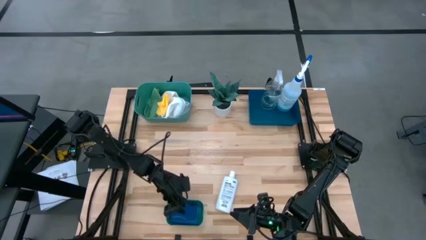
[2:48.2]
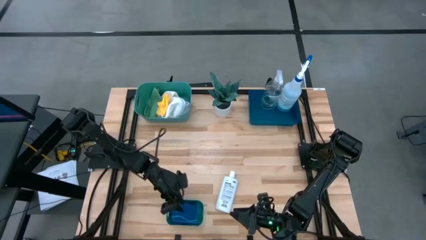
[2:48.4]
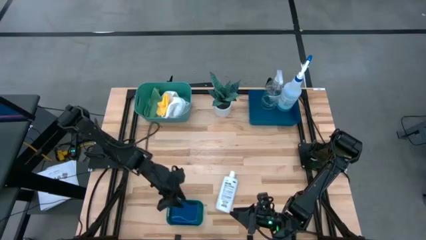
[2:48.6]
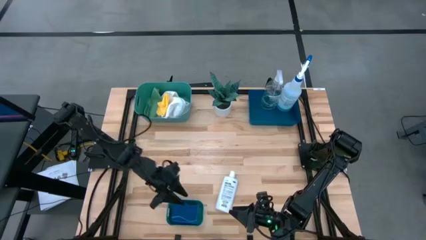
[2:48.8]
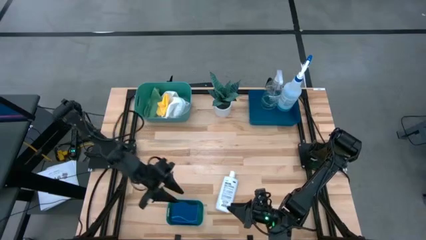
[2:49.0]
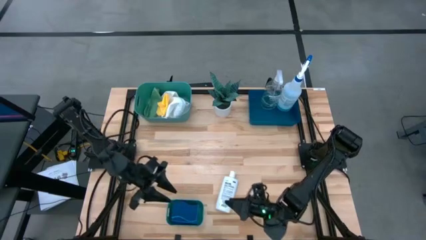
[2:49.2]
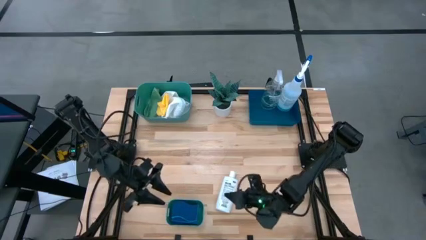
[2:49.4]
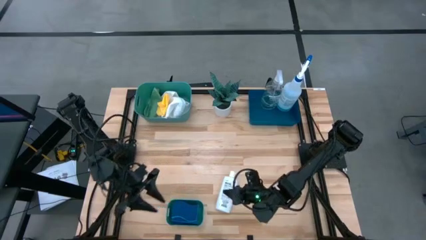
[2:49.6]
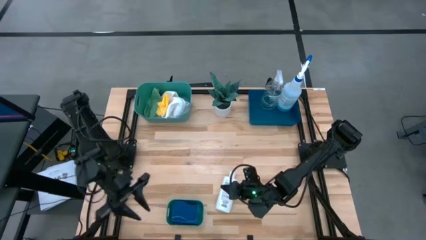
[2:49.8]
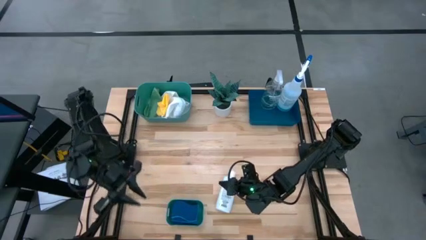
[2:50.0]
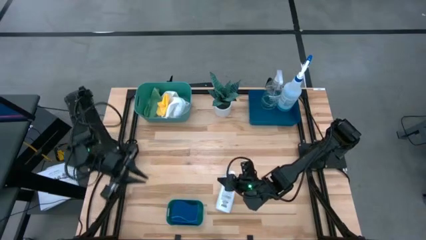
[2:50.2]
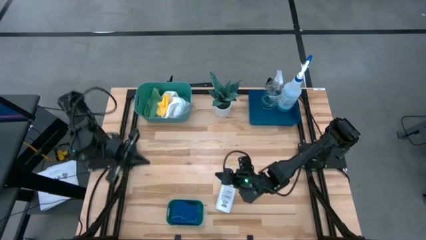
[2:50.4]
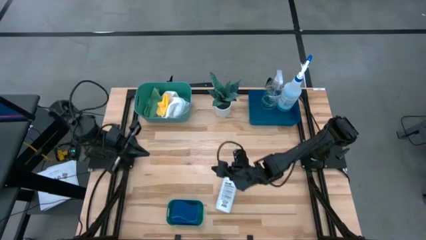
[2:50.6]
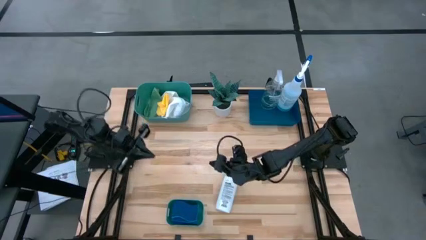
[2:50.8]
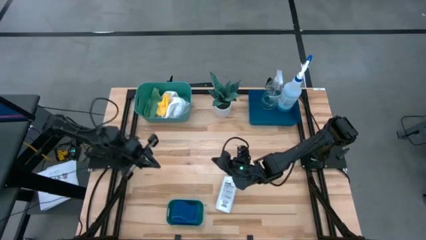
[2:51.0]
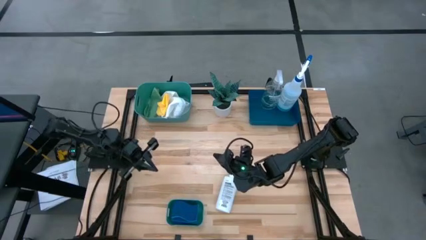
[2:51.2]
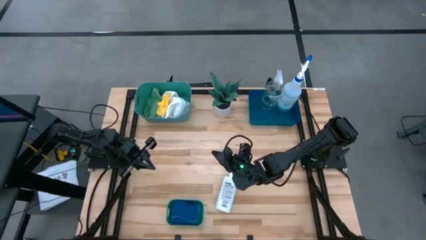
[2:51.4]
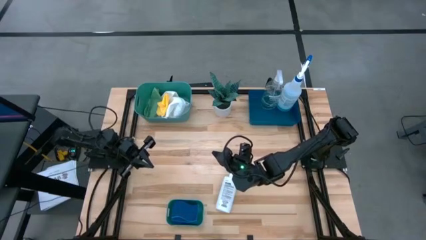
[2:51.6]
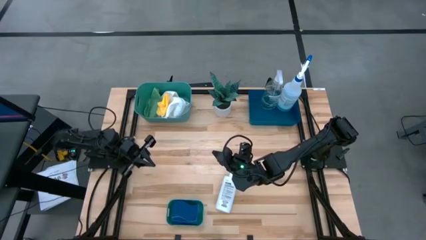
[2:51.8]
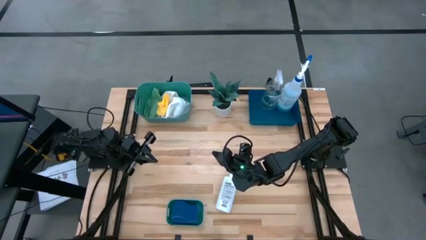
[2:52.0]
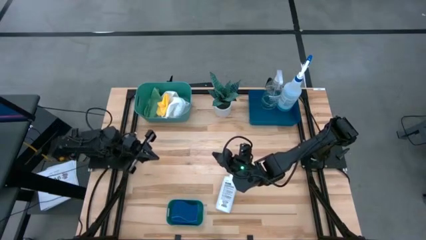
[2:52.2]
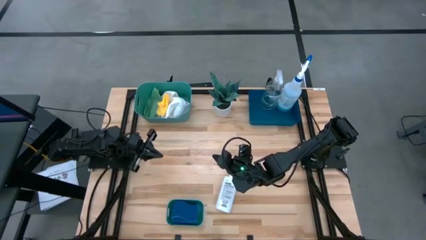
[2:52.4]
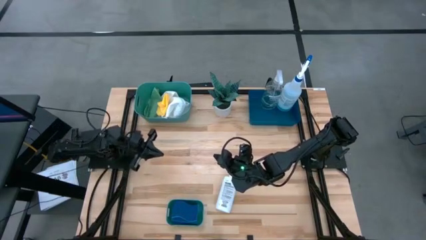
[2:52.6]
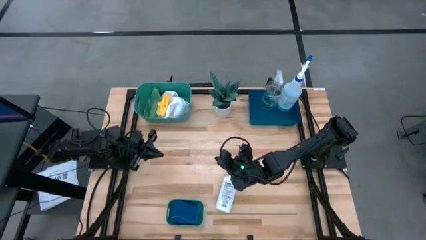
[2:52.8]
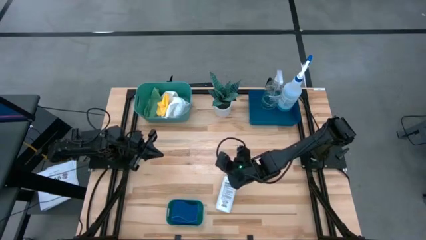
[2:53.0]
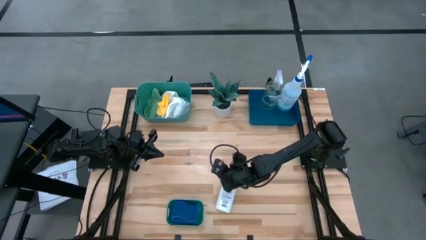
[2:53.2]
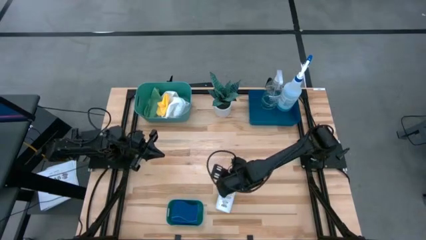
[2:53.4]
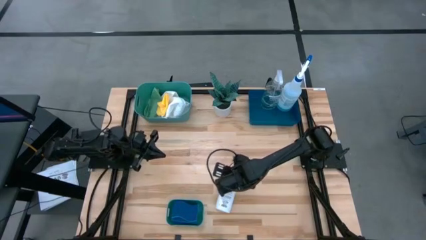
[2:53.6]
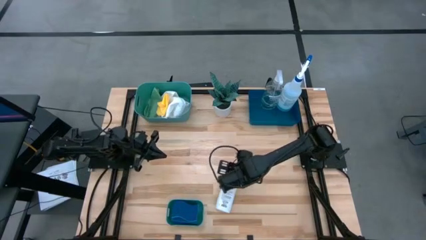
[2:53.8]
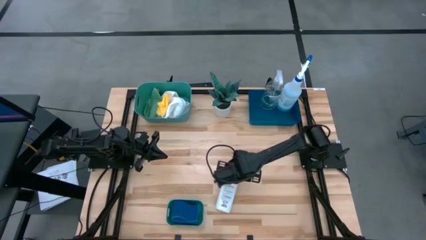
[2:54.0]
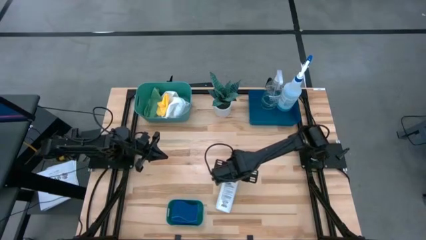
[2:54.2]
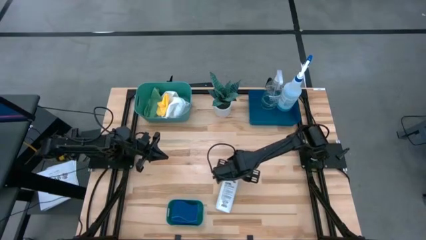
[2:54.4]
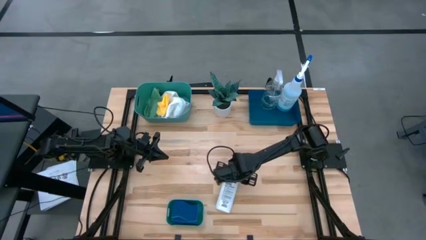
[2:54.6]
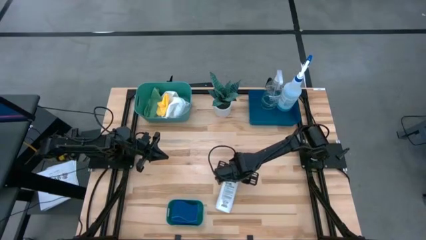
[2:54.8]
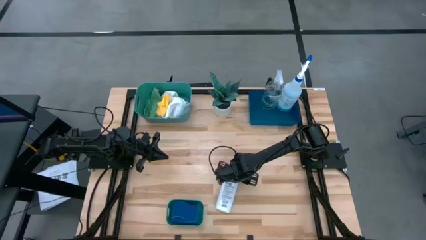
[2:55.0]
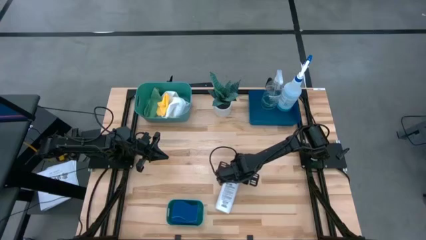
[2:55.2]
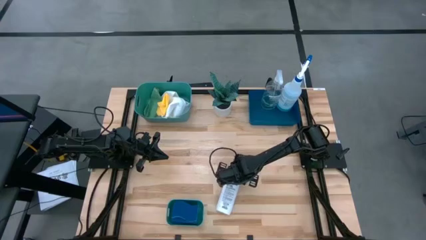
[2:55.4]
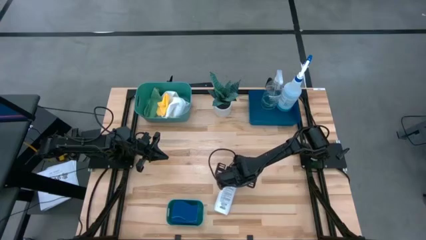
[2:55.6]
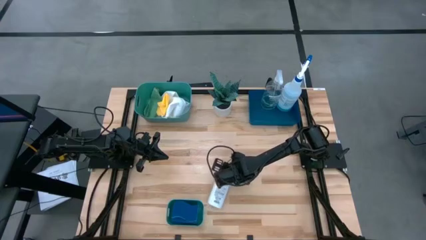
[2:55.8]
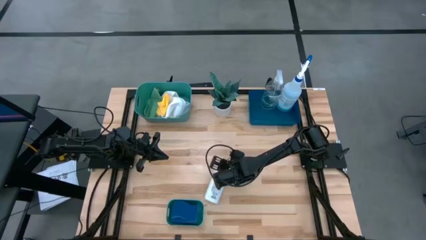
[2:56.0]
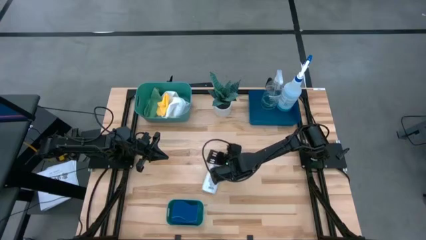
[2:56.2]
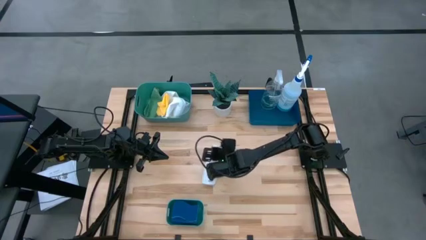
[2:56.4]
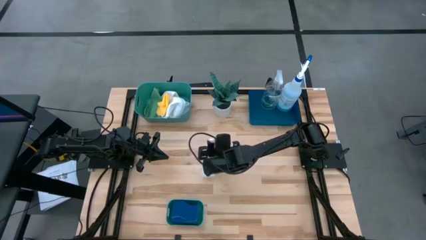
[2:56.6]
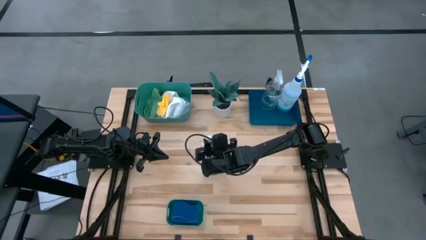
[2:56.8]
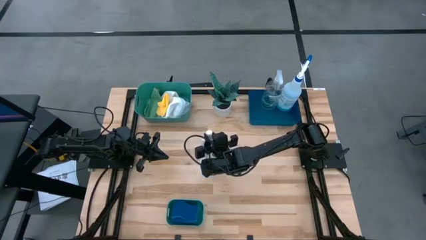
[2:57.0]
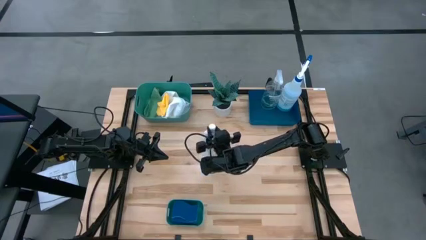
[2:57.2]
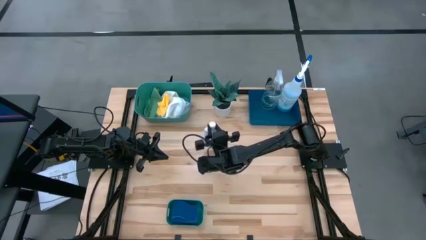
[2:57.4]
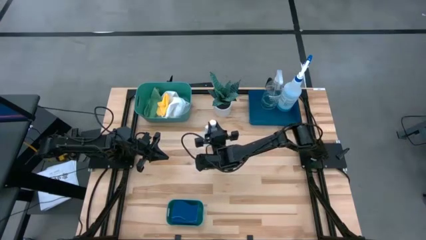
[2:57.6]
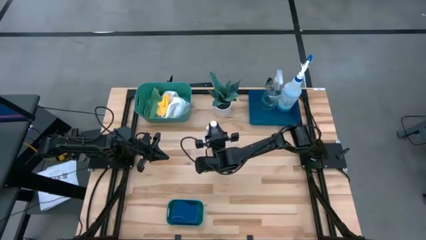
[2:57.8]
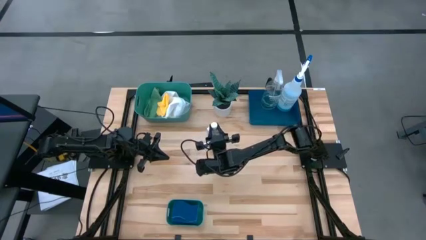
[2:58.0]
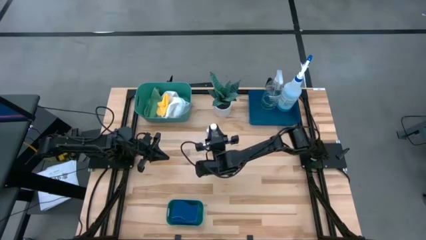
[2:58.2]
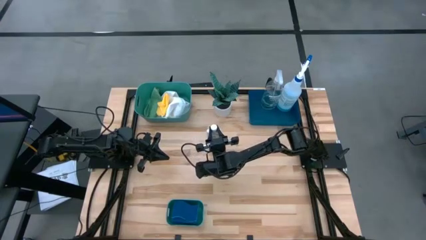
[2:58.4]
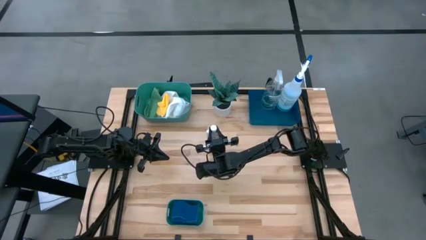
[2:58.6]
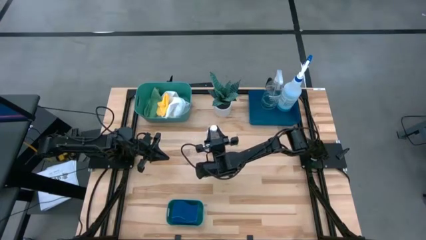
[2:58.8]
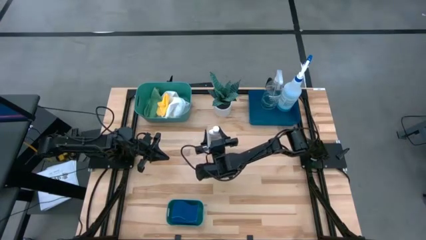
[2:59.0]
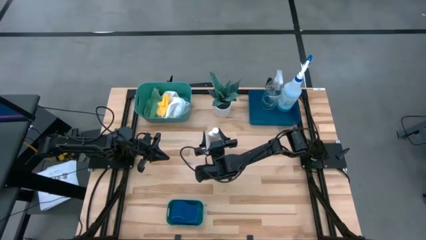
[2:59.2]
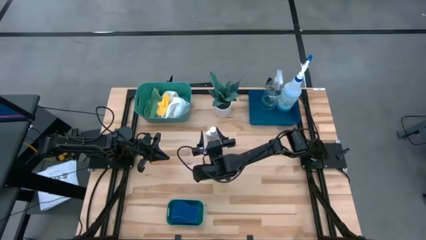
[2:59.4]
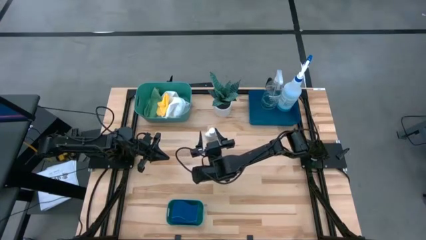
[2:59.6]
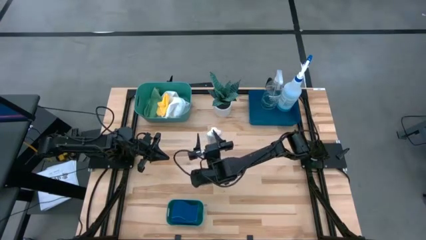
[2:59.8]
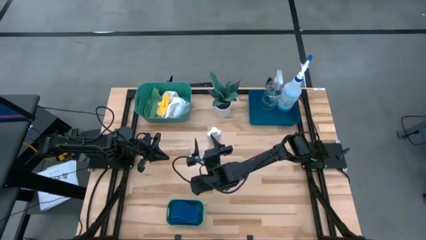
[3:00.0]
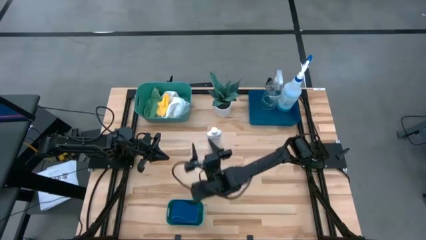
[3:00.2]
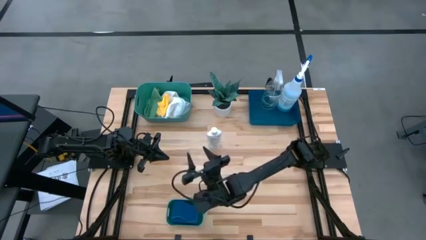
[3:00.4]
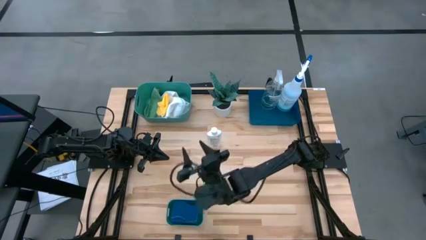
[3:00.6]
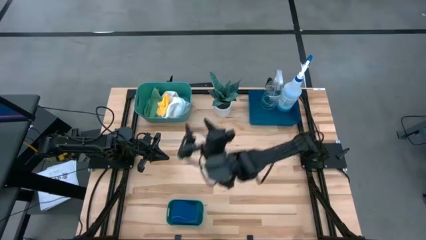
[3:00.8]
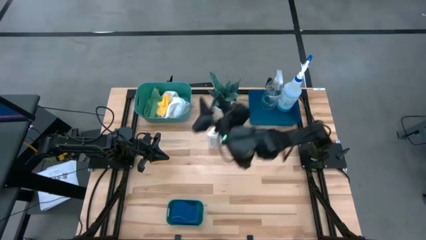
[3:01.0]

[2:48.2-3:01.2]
Task: Pick & Place Kitchen Items
Put the white plastic restorer bottle into the blue bin

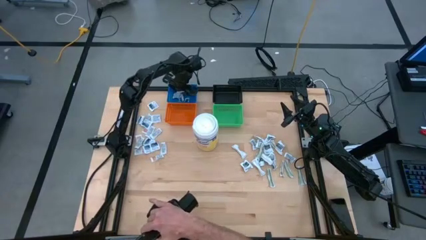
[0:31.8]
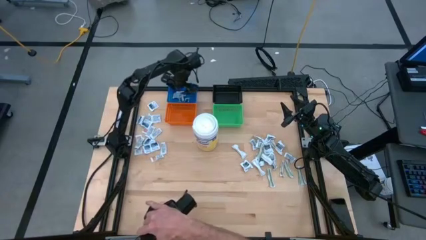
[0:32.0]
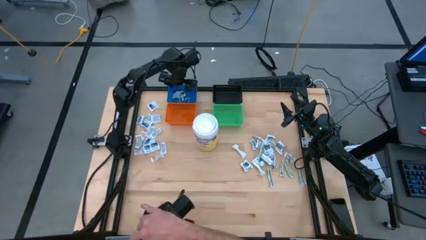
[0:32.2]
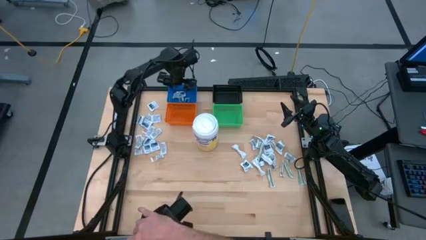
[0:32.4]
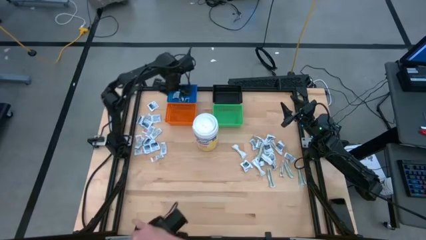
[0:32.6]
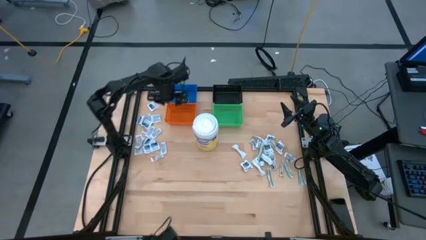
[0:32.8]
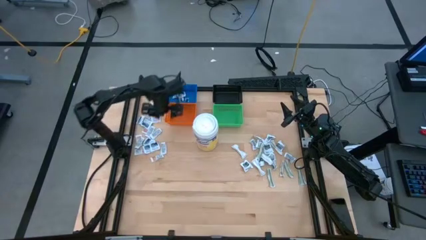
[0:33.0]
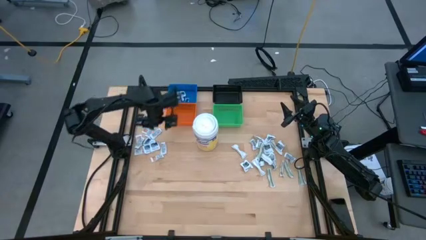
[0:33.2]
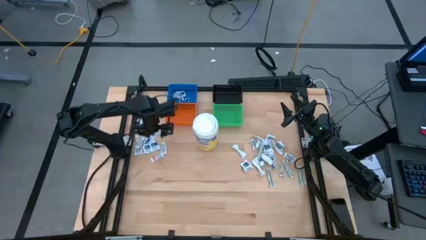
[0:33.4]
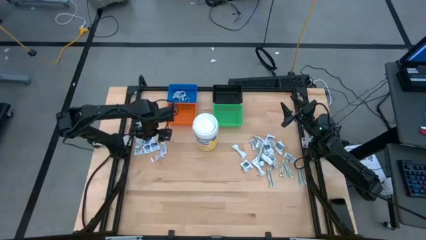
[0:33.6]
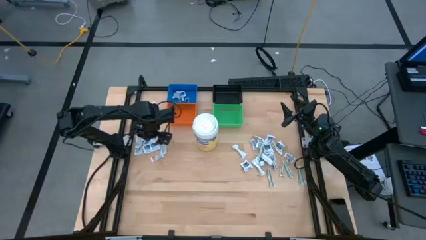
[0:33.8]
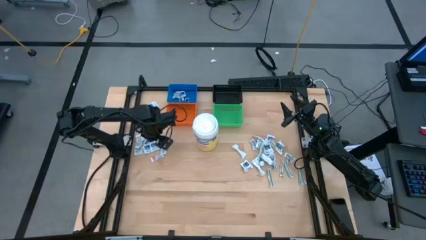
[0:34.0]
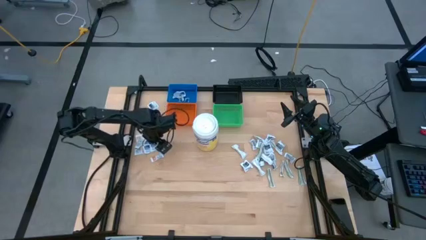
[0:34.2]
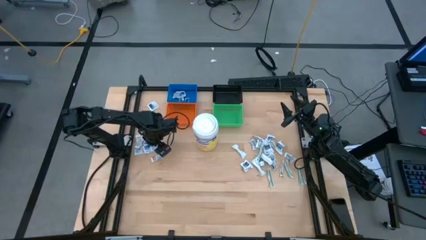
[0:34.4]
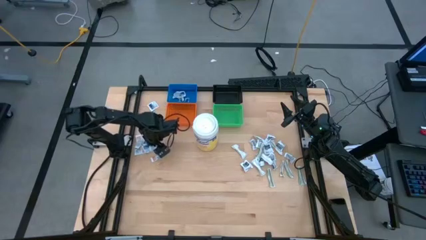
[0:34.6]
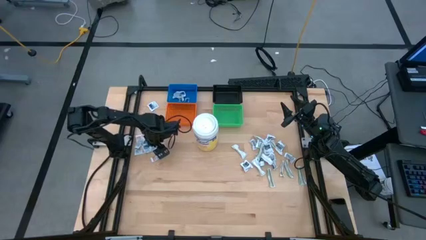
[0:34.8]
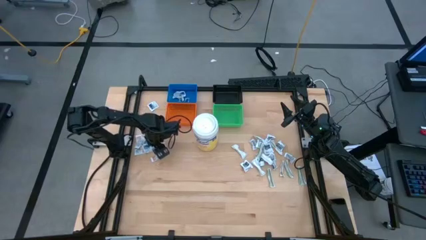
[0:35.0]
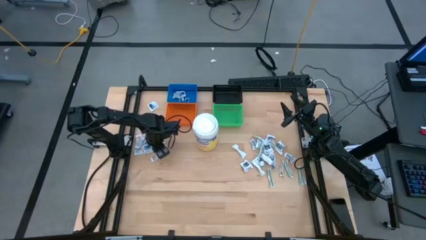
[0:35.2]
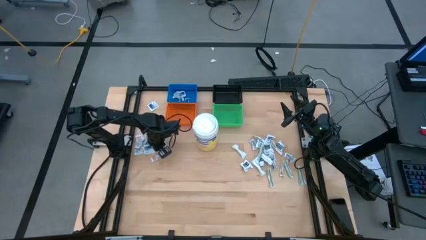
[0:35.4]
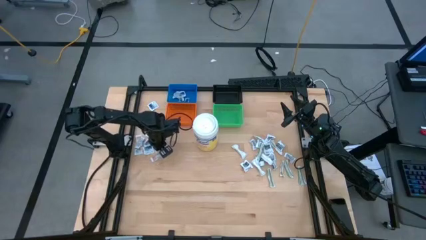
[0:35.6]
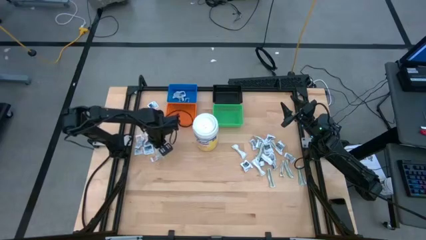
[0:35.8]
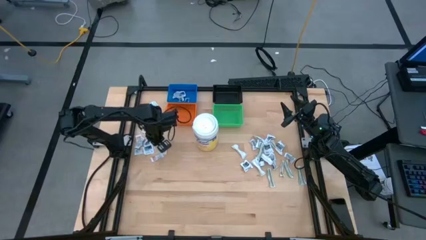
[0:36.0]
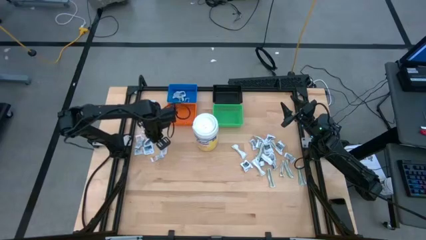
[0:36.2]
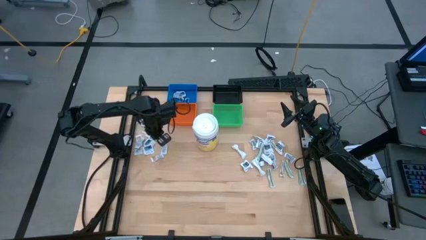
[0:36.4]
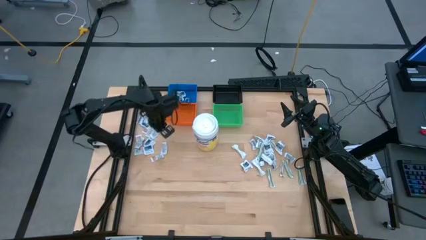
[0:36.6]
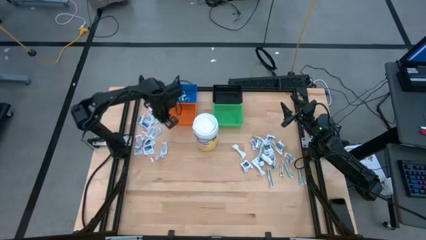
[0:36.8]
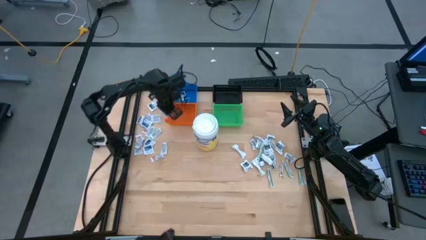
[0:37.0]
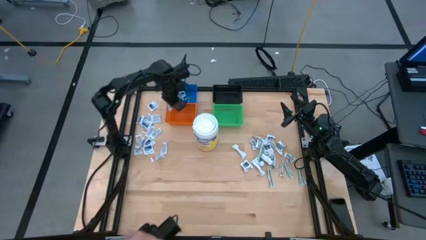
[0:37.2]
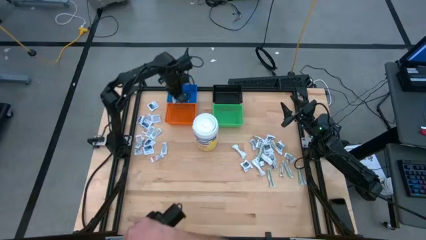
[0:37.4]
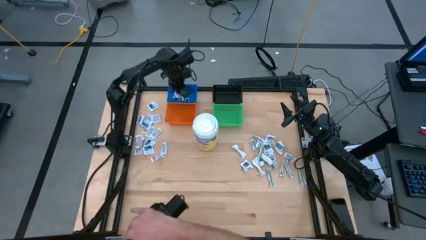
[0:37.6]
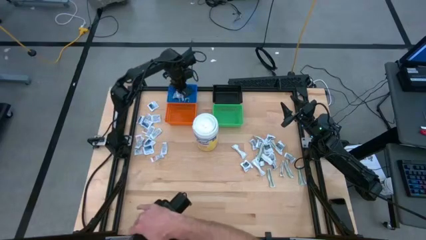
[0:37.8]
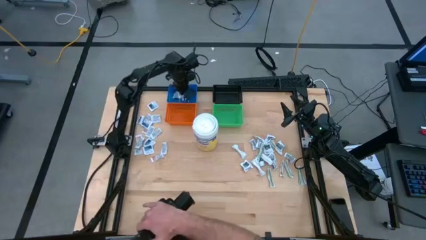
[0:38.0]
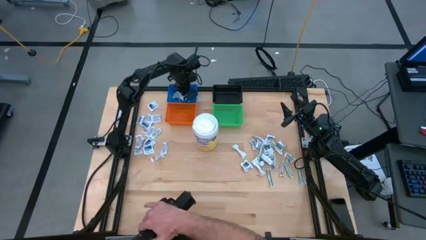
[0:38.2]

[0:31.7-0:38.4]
Task: Pick & Place First Aid Supplies
Put the blue alcohol pad into the blue bin
